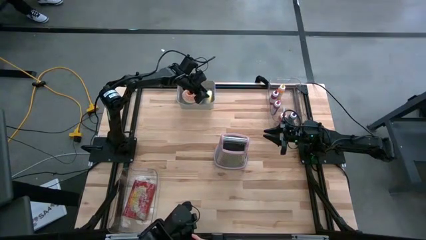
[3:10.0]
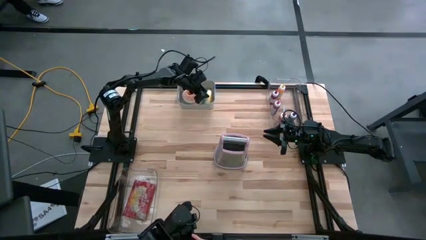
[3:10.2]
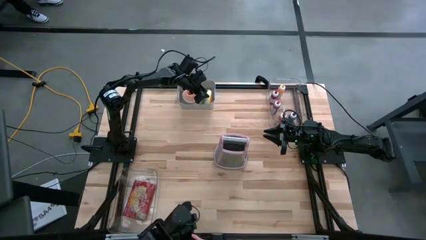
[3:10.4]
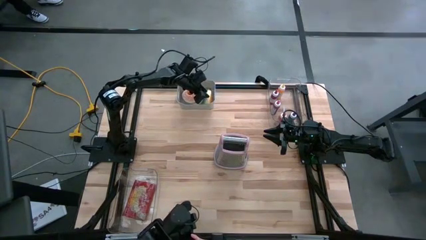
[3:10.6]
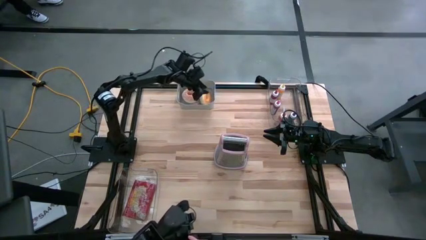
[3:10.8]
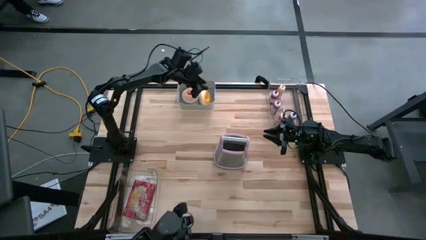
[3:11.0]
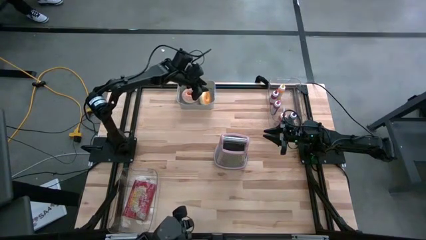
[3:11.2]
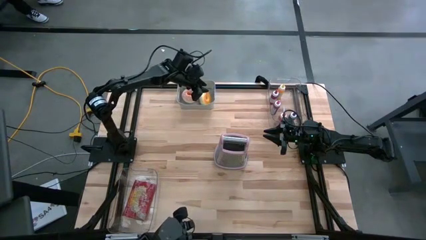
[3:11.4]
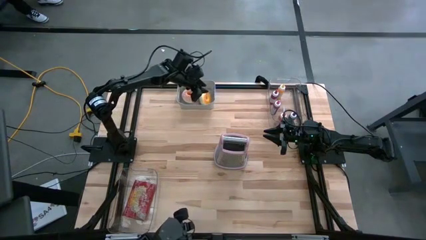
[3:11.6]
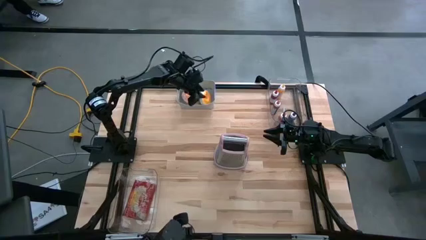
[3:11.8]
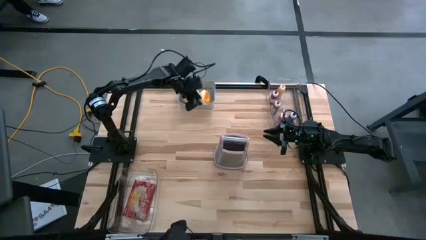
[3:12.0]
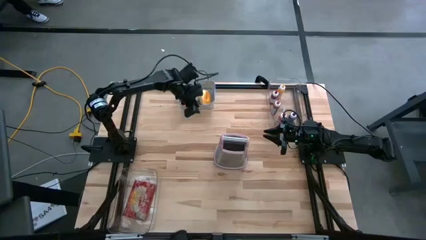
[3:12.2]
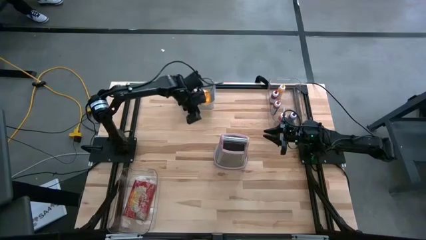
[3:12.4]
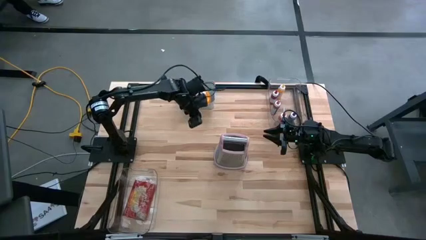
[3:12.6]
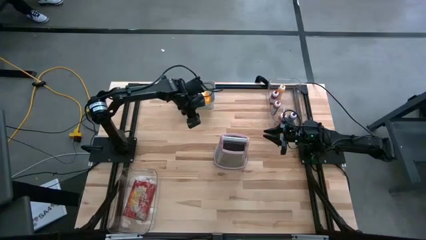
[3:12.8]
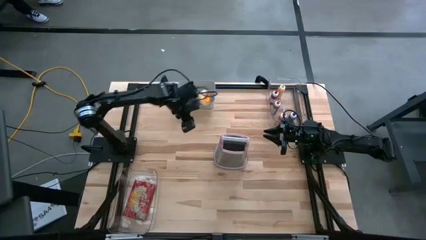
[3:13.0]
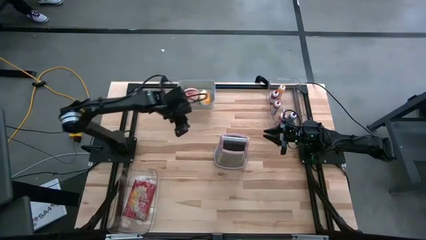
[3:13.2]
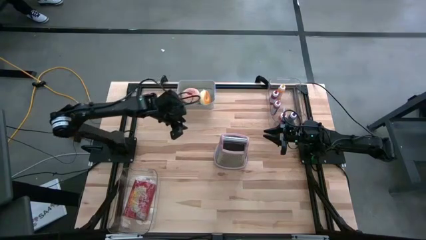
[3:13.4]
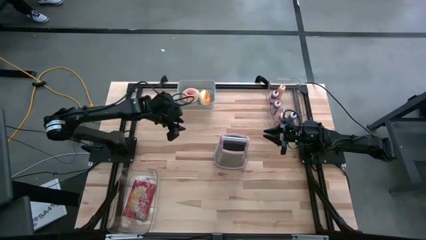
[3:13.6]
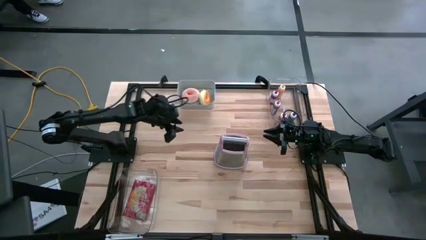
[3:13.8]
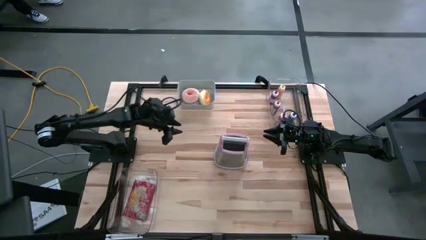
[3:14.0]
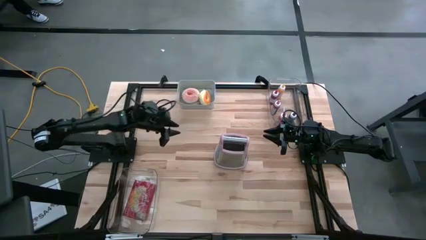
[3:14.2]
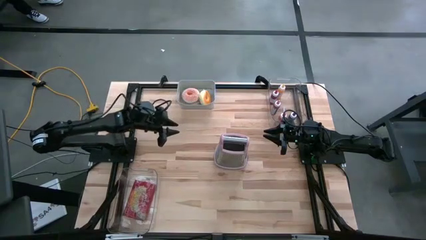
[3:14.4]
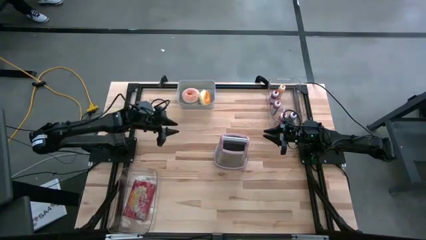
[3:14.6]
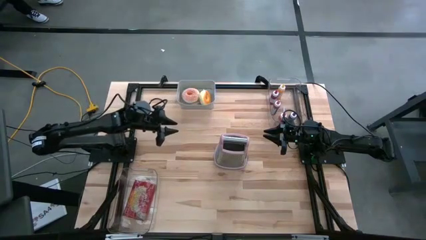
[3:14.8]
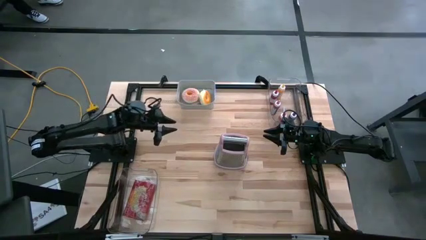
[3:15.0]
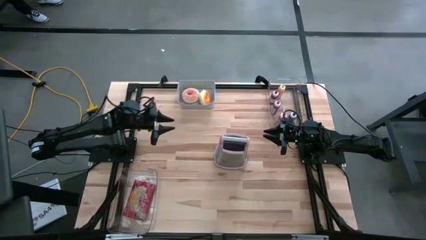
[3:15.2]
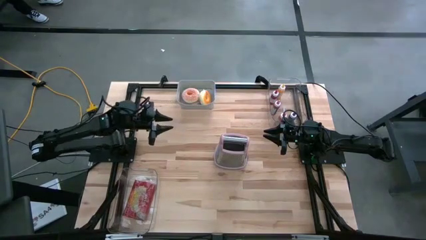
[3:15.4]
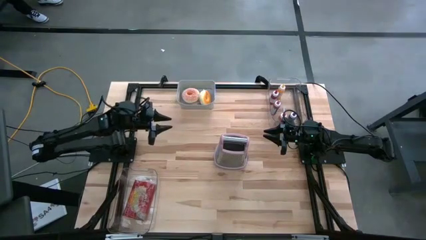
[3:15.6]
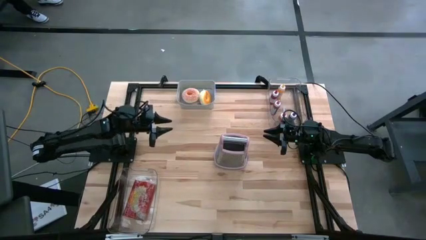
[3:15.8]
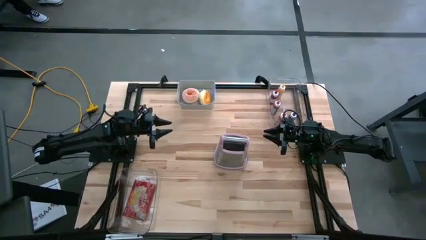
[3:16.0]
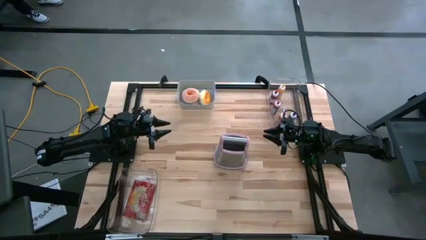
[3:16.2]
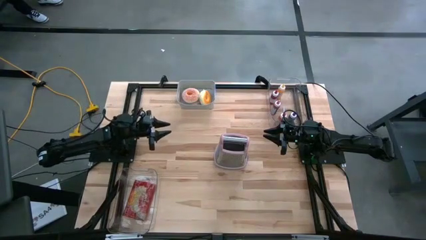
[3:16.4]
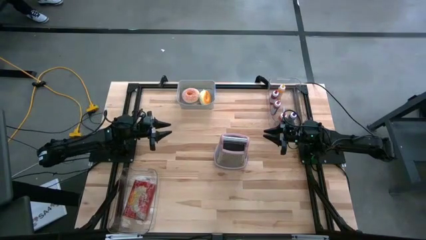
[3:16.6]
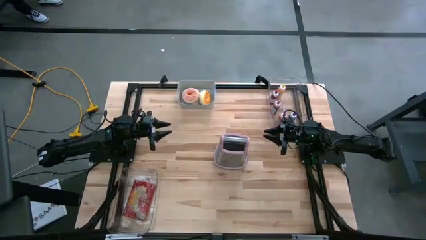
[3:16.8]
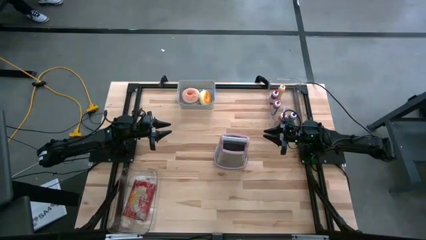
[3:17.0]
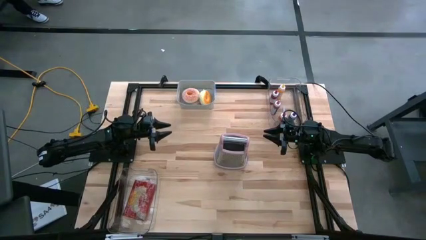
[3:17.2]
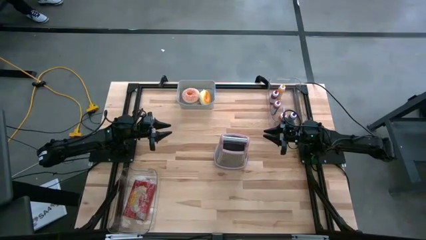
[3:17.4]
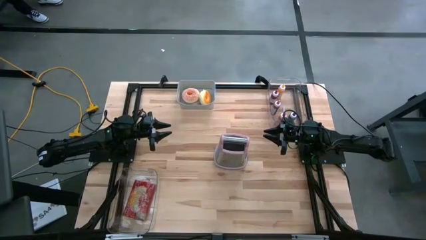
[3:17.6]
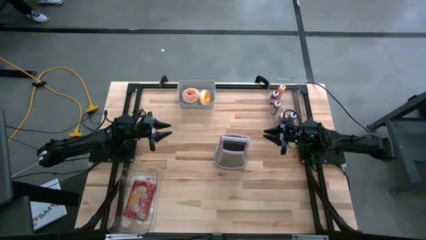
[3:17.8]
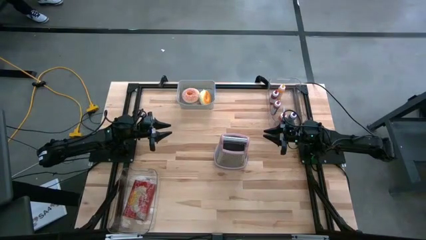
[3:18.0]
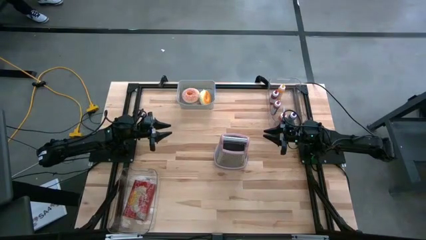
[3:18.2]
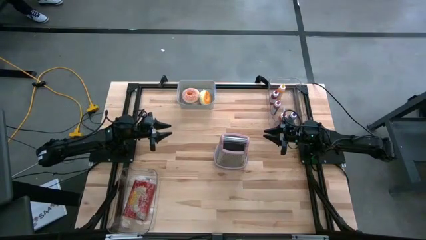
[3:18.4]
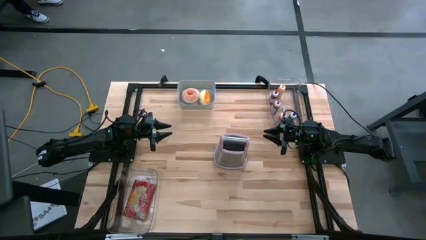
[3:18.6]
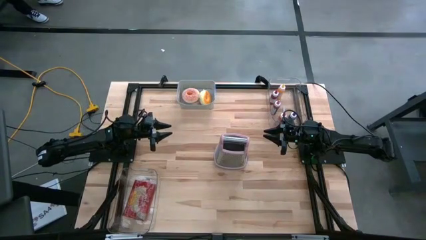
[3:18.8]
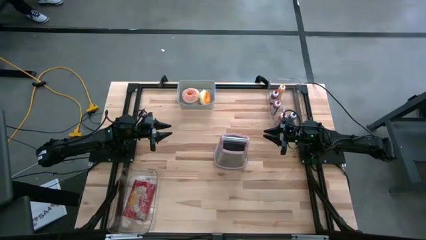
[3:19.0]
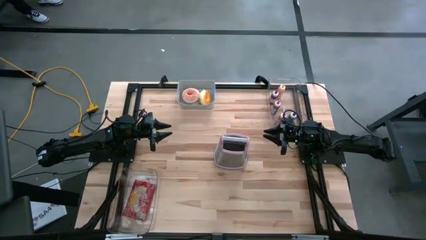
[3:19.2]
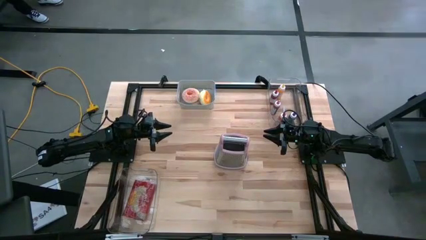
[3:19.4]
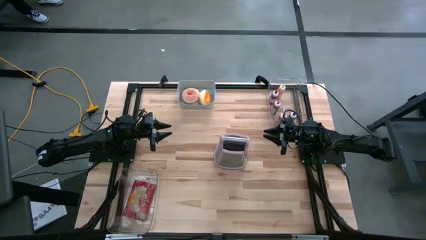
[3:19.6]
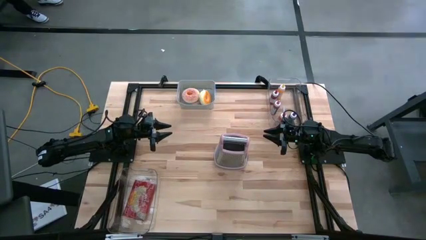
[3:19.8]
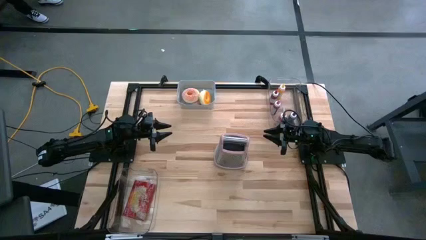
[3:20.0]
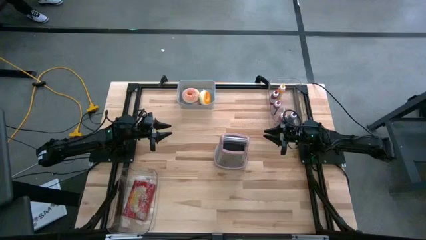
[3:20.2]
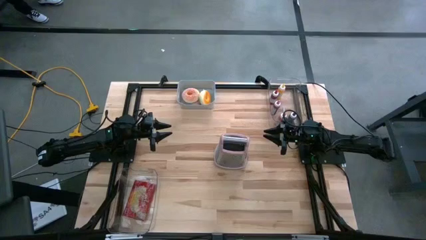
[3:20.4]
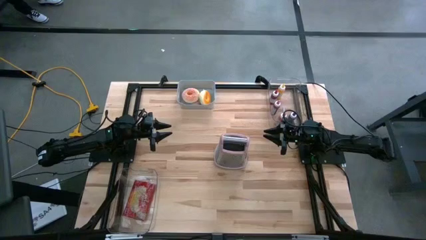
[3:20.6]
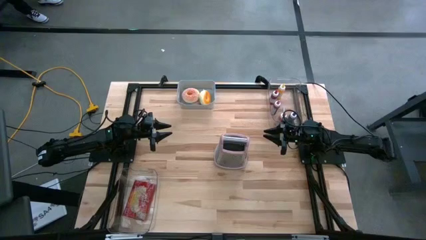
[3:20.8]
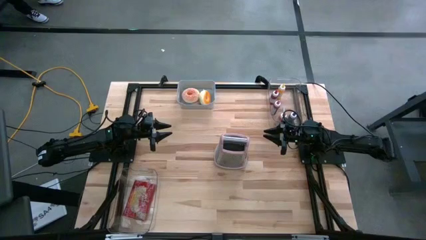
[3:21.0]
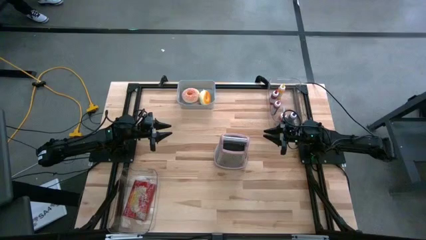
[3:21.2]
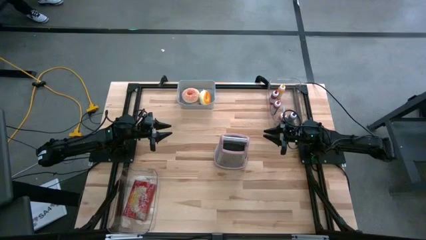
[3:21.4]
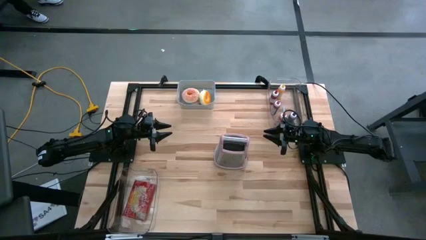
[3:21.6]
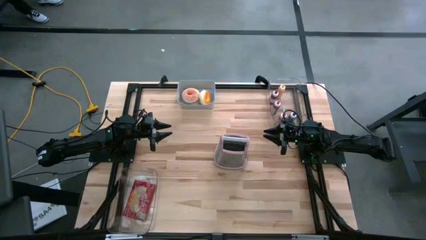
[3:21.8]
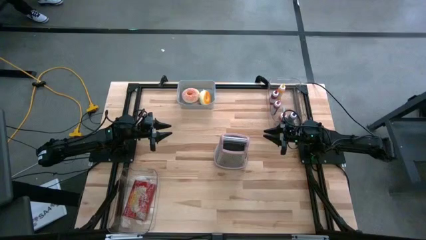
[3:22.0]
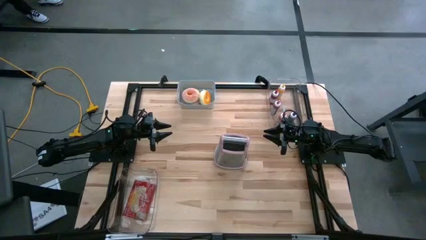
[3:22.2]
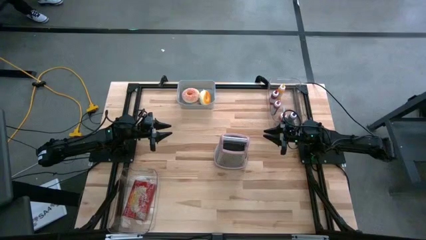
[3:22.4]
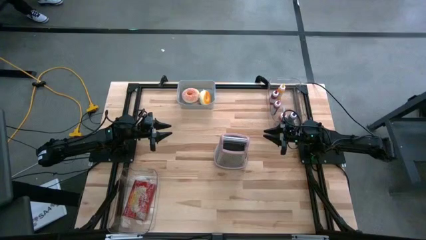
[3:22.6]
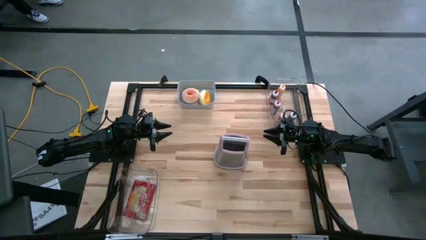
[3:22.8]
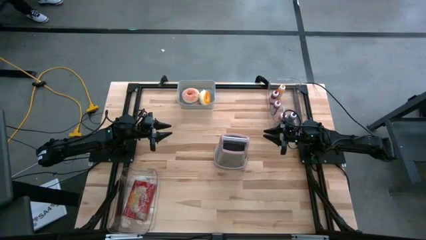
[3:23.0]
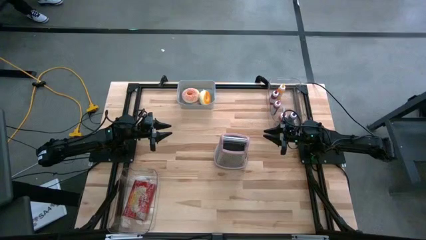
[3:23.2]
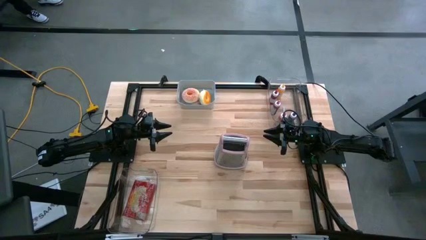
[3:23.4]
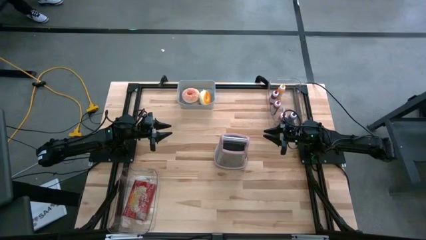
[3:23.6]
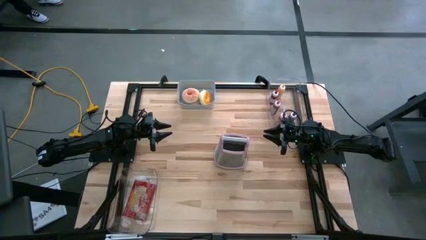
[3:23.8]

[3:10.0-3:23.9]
Return to Home Position
